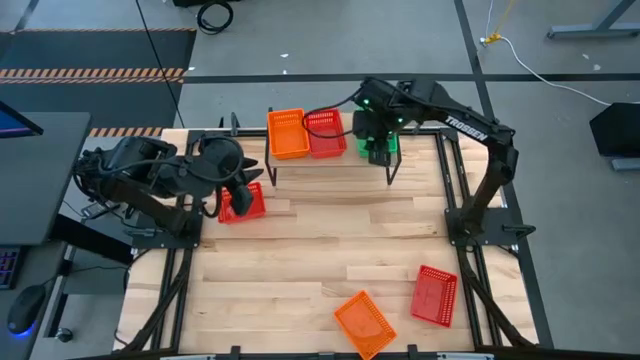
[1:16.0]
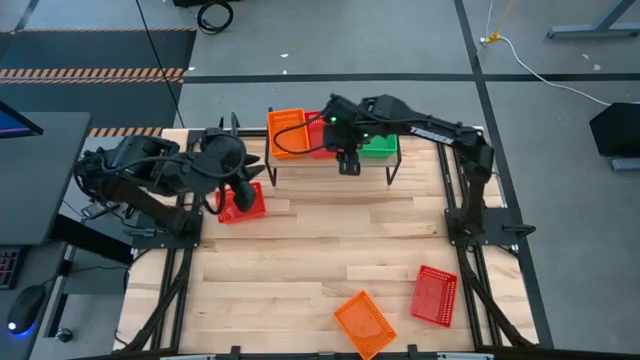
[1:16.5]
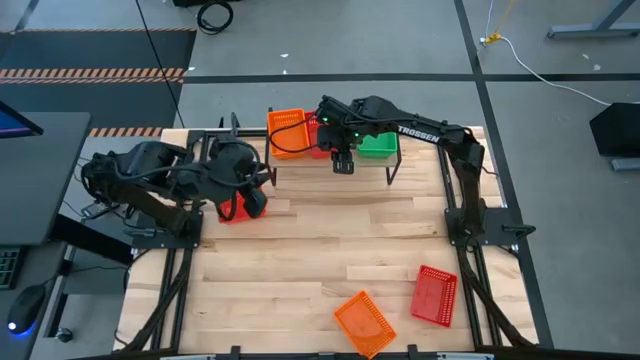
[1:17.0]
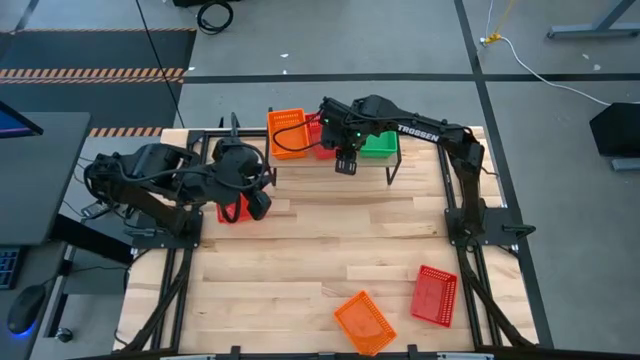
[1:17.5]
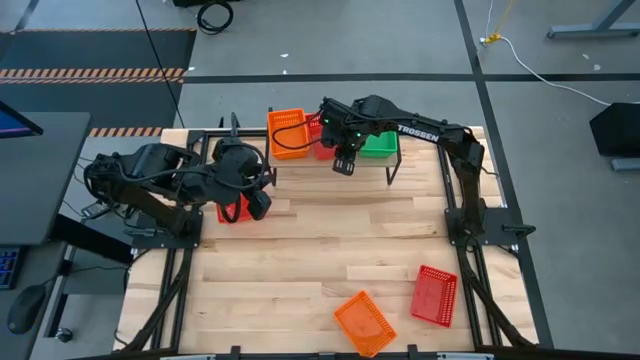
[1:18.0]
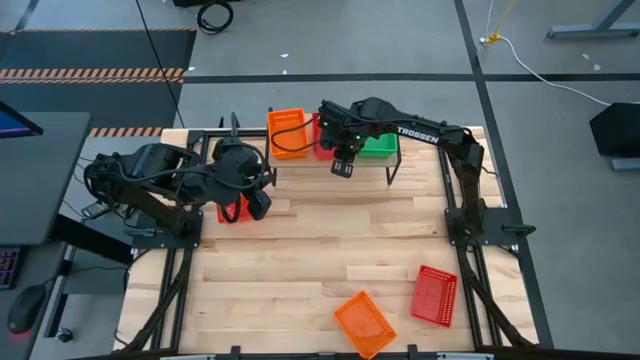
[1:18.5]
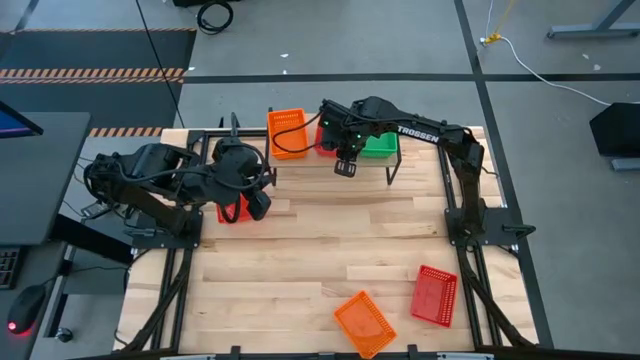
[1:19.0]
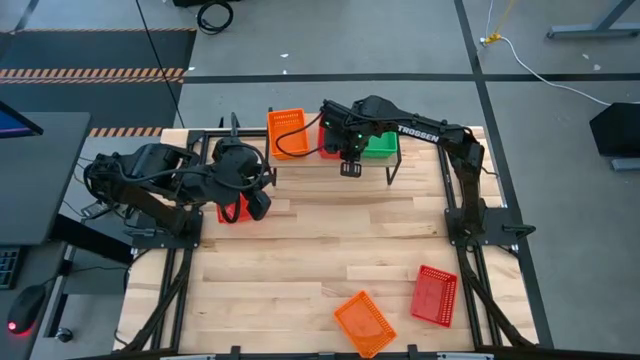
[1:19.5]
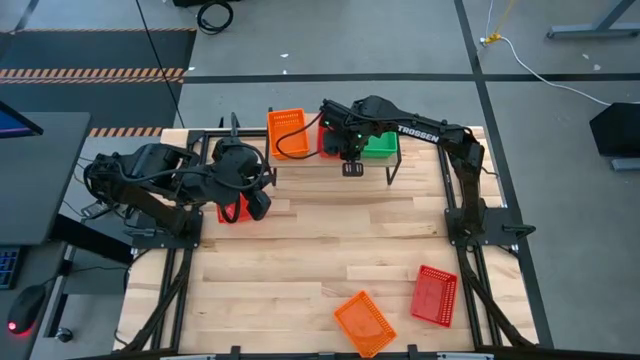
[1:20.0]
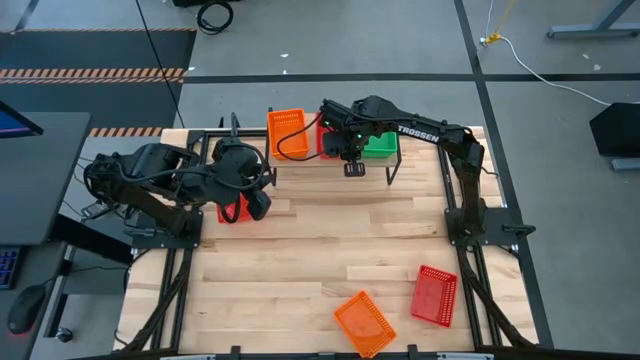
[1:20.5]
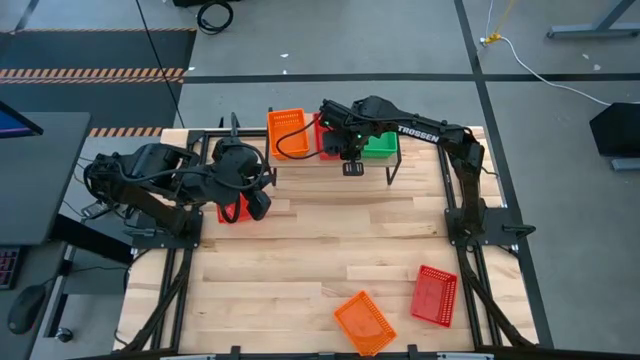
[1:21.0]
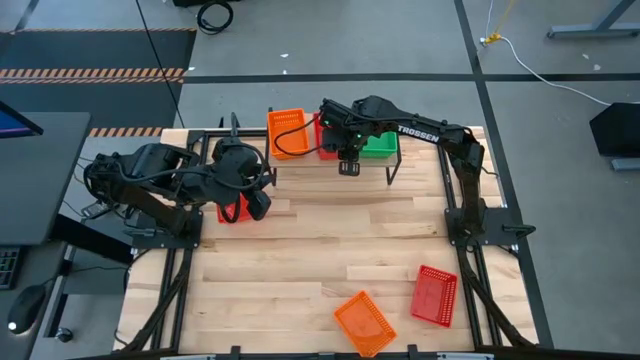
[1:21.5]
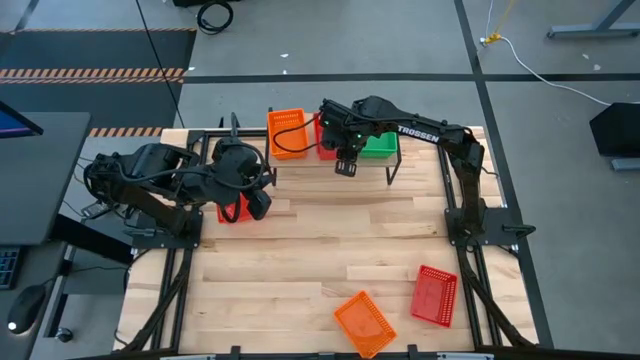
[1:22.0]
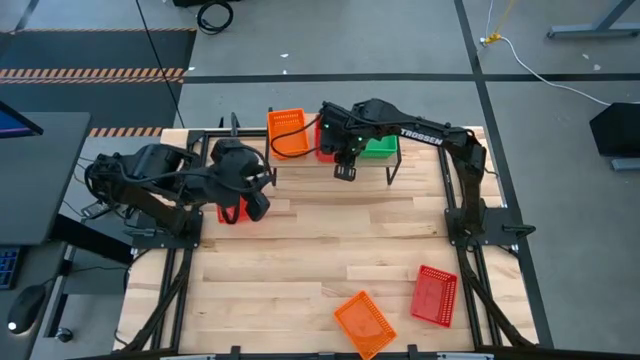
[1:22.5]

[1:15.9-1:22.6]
Task: Stack baskets on shelf by color
Adjust the red bin on the shelf

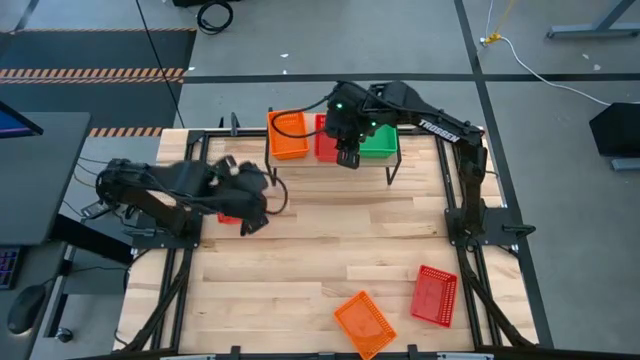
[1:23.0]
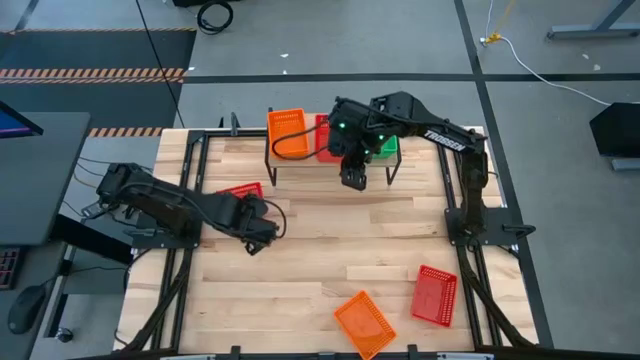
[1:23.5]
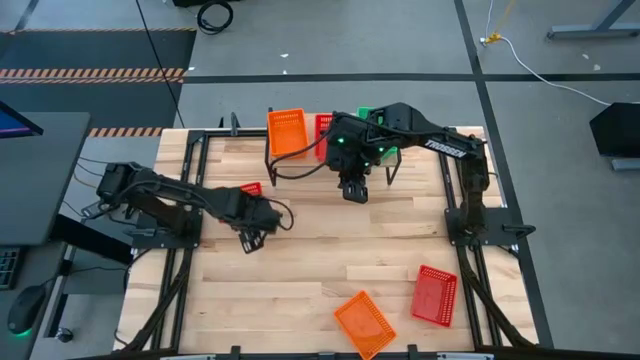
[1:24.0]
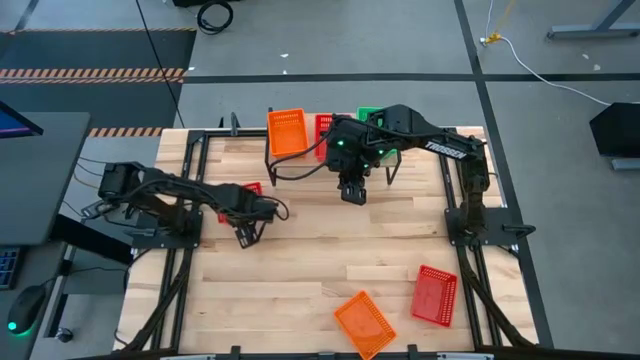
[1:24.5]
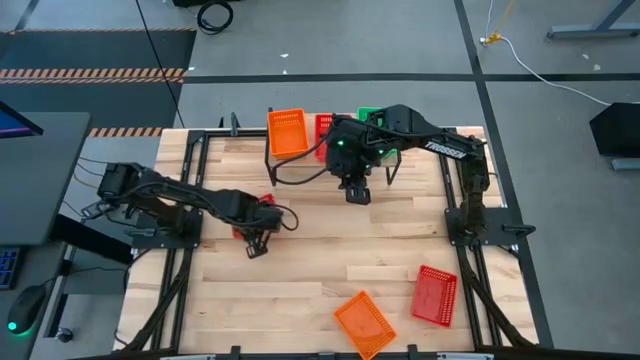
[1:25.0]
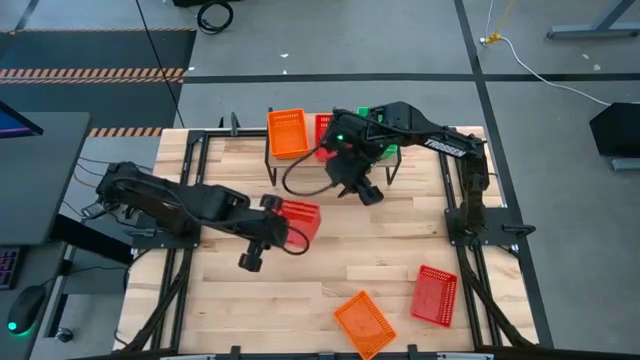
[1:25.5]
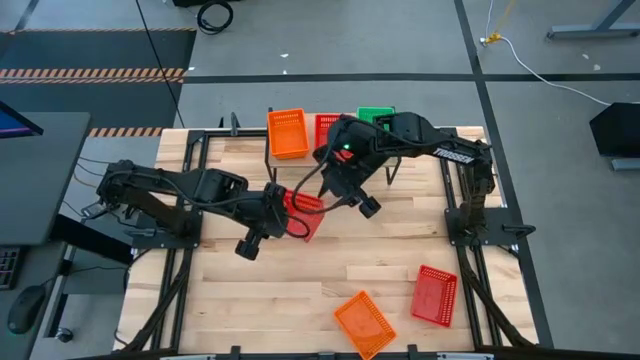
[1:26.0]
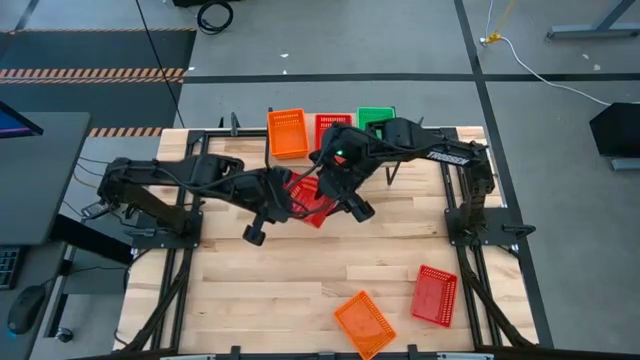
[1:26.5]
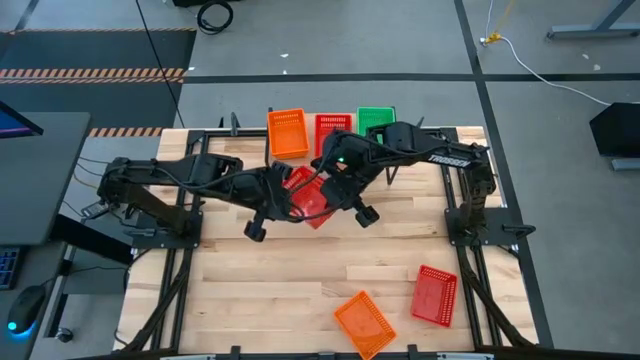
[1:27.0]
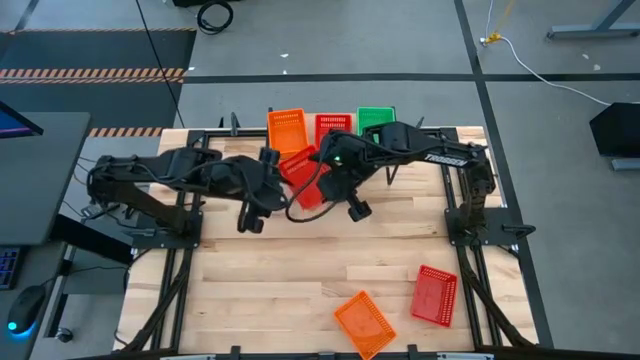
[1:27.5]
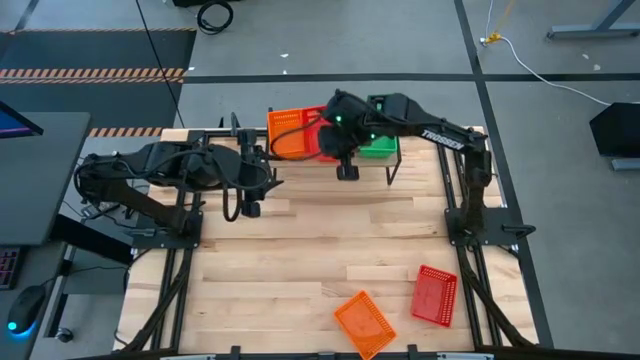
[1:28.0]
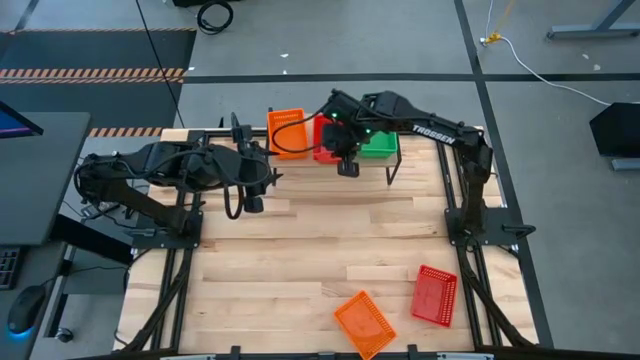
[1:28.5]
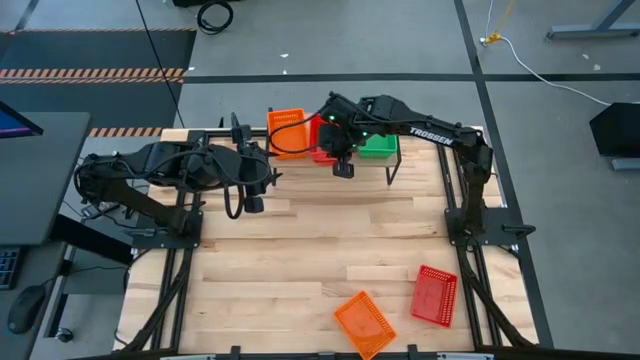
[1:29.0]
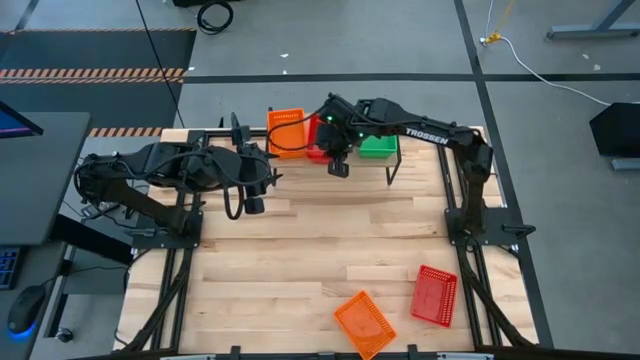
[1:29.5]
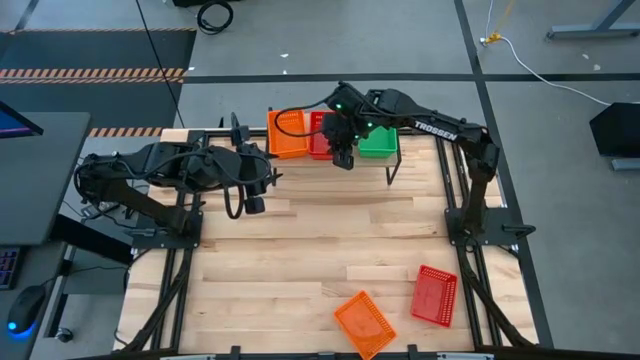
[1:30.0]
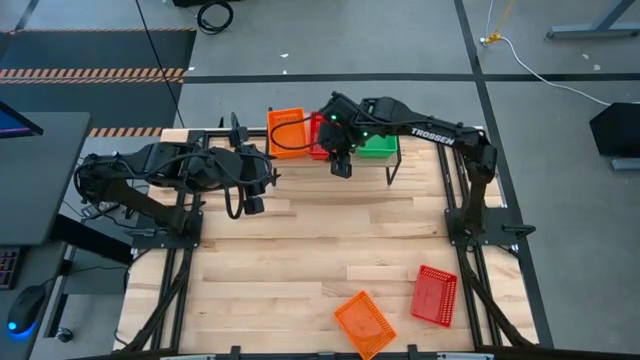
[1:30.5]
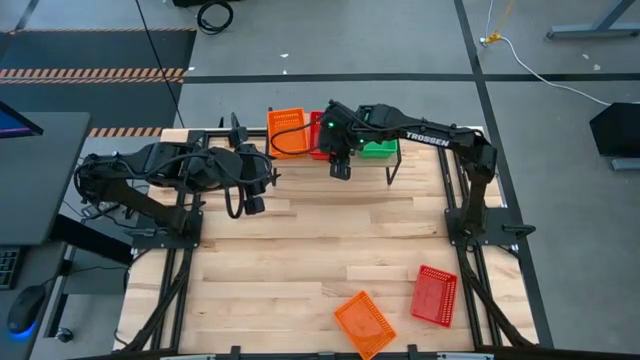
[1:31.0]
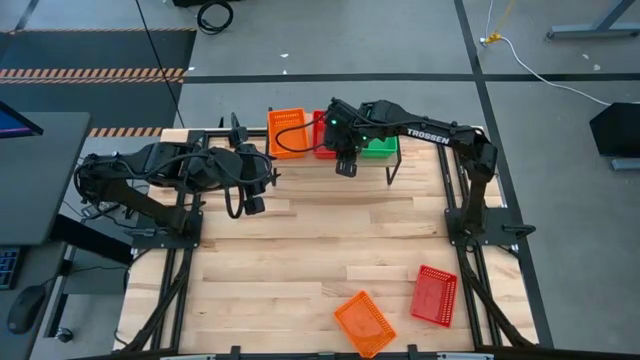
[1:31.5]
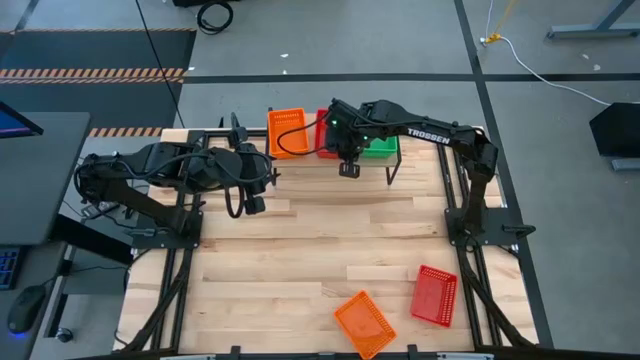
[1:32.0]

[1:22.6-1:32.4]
Stack the top red bin on top of the other orange bin on the shelf

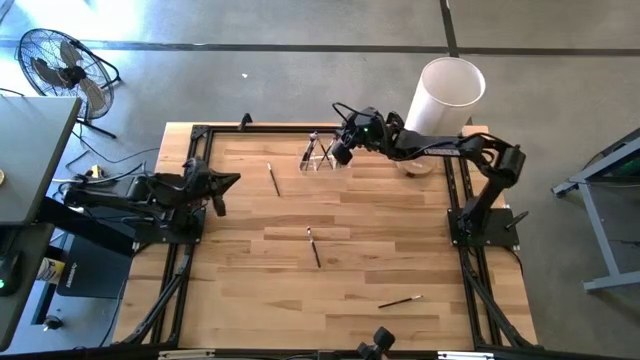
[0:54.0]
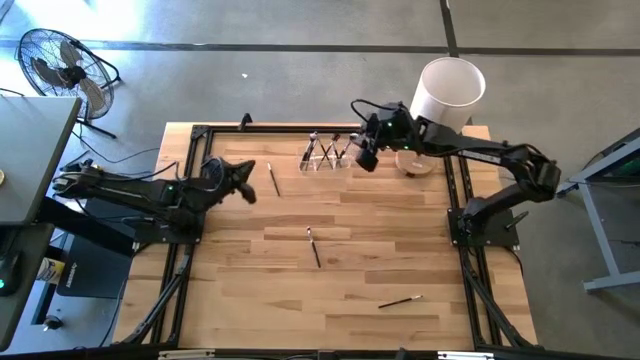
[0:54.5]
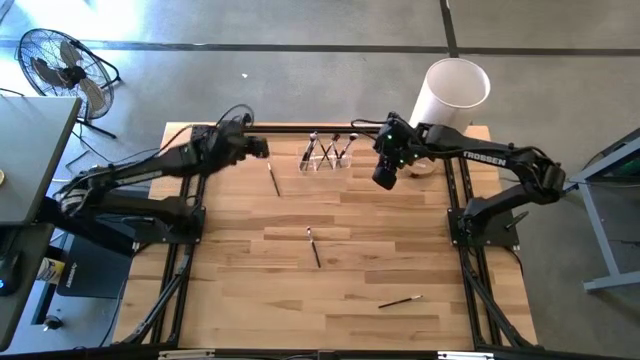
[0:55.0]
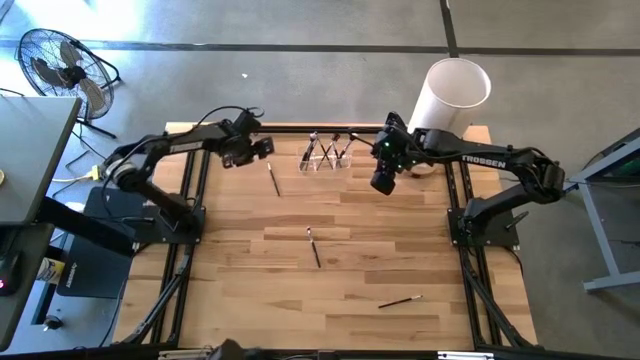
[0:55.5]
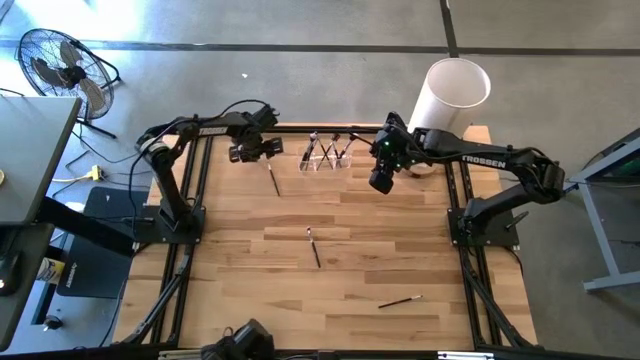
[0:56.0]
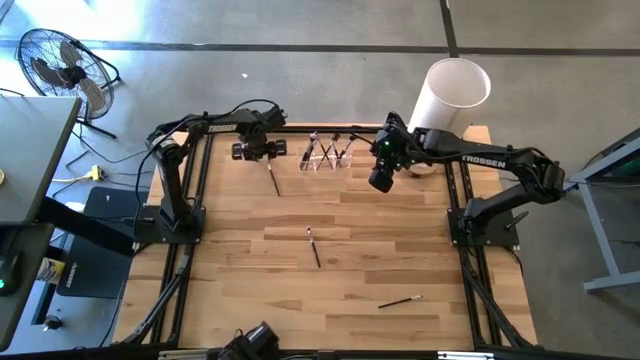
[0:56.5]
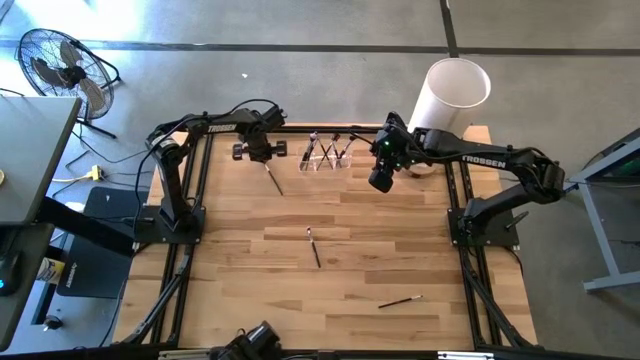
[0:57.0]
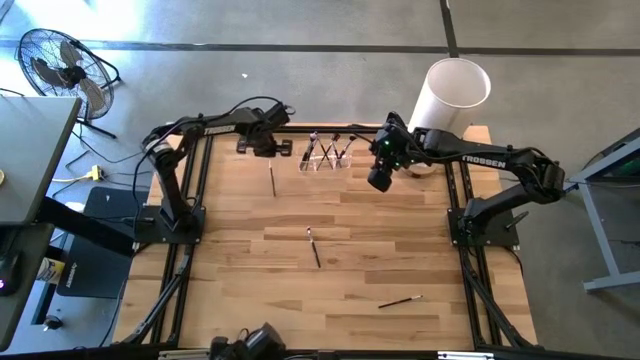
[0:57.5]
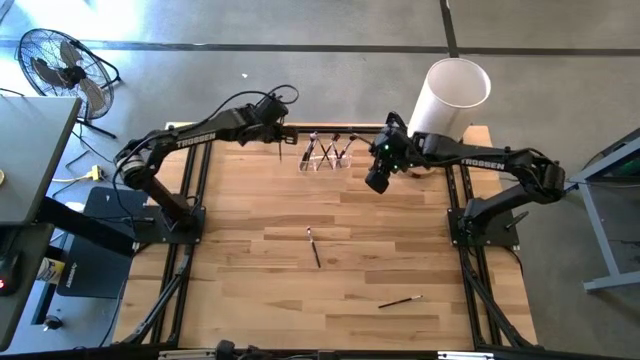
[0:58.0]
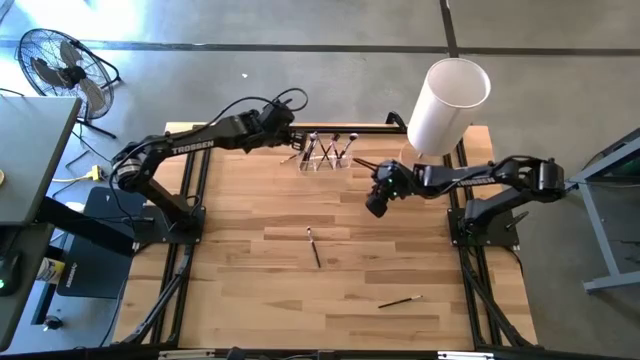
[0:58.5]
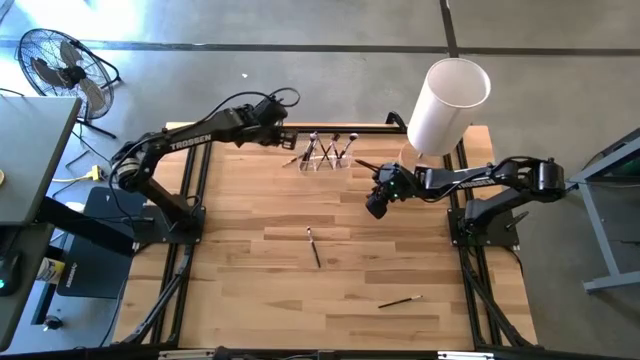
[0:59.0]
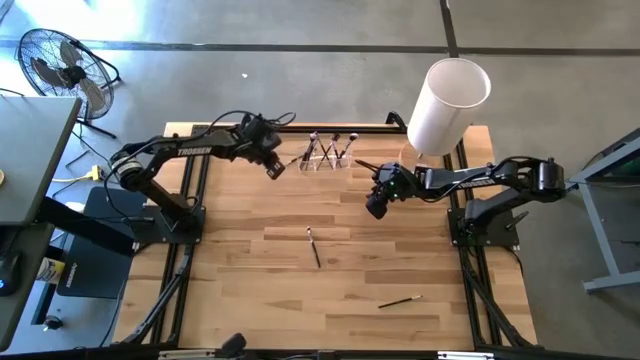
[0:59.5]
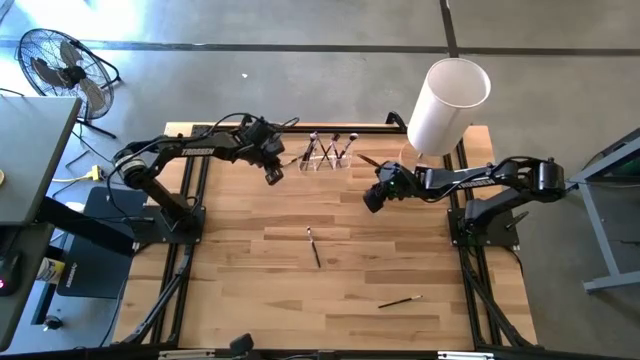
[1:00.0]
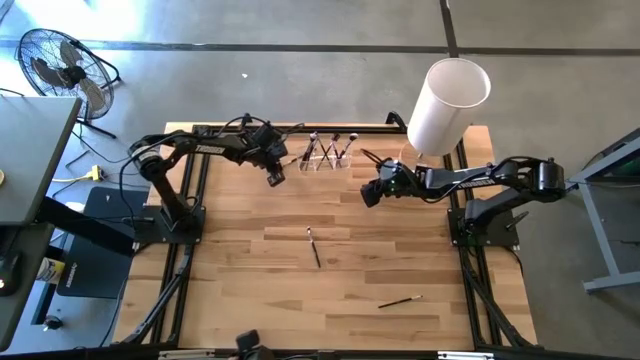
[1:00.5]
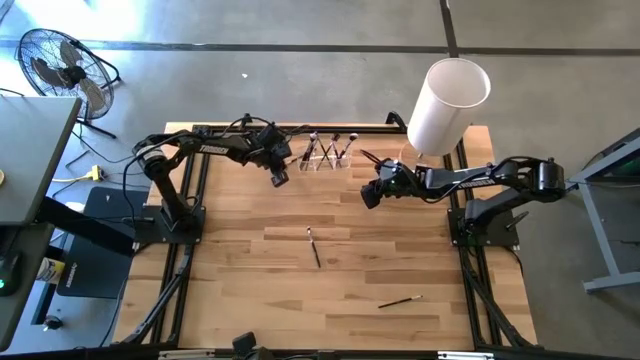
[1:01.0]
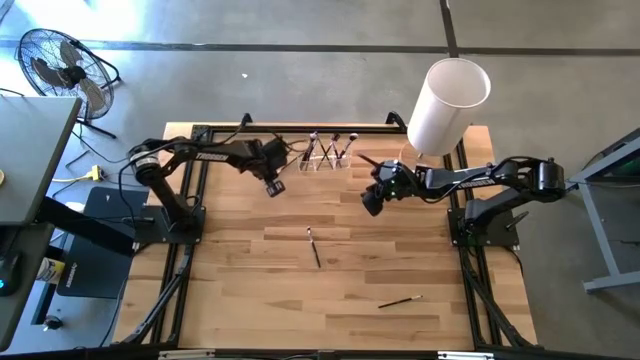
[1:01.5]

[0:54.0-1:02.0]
Task: Pick & Place Makeup Brushes
Put the black eyeshadow brush into the transparent organizer
